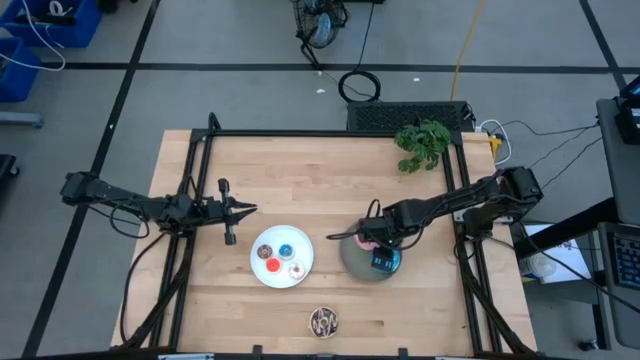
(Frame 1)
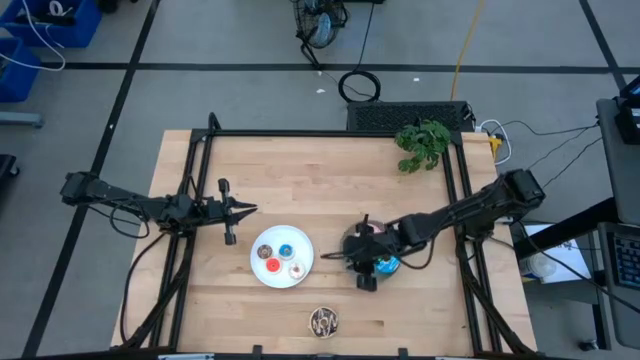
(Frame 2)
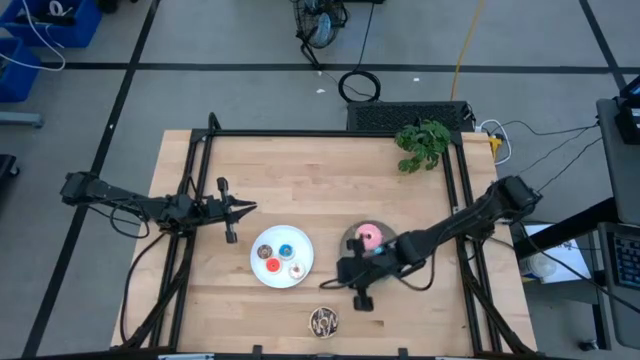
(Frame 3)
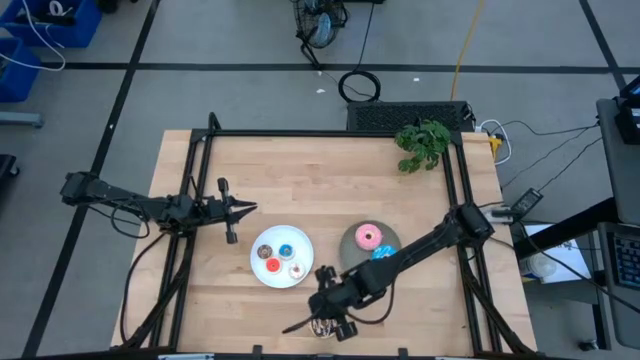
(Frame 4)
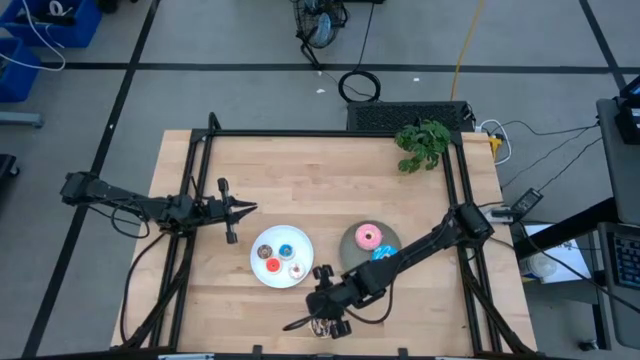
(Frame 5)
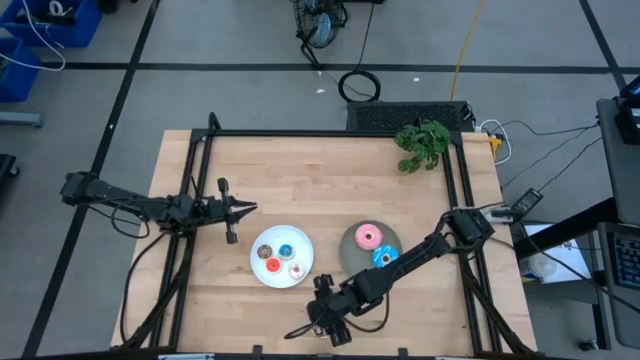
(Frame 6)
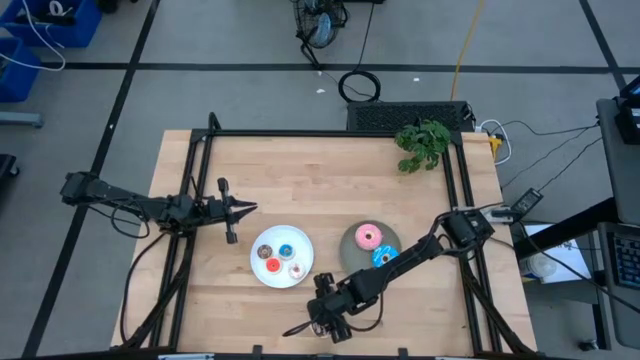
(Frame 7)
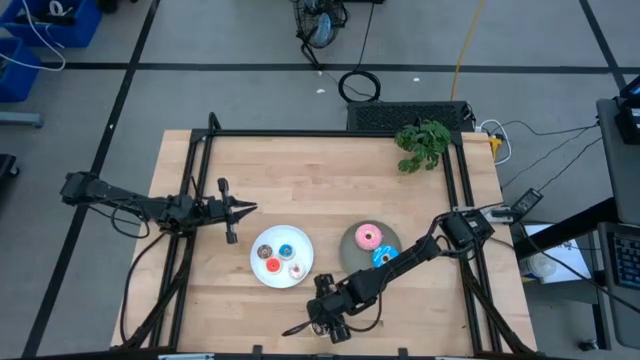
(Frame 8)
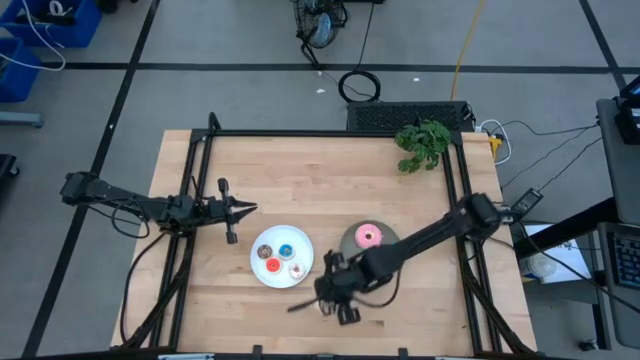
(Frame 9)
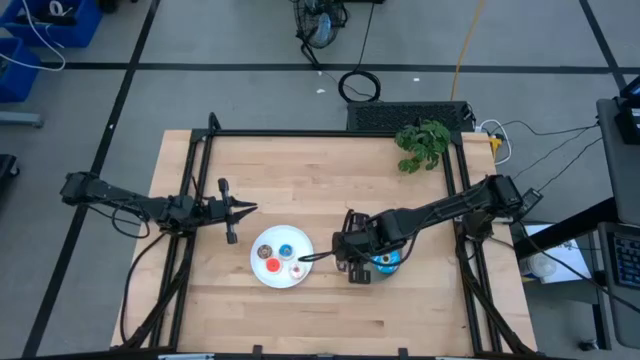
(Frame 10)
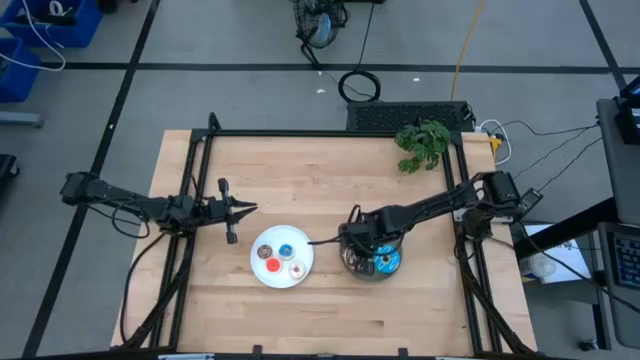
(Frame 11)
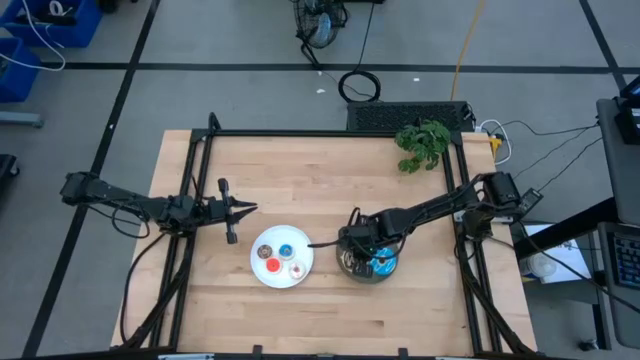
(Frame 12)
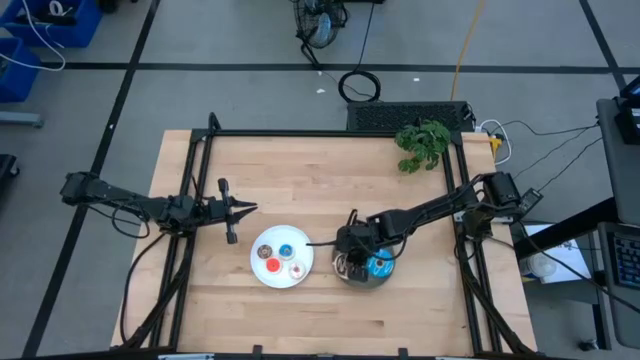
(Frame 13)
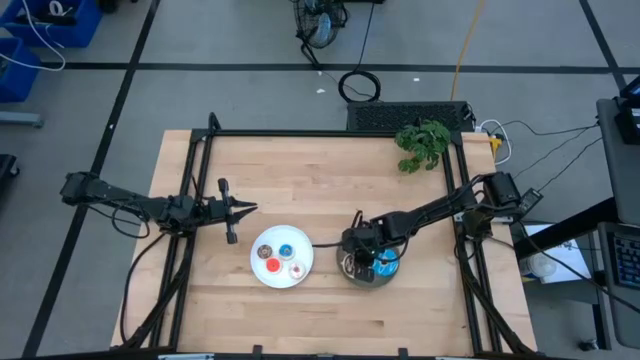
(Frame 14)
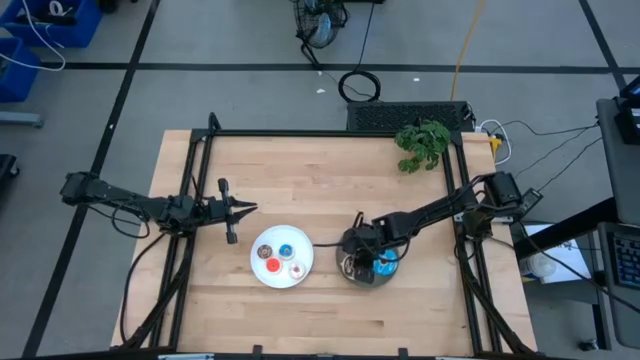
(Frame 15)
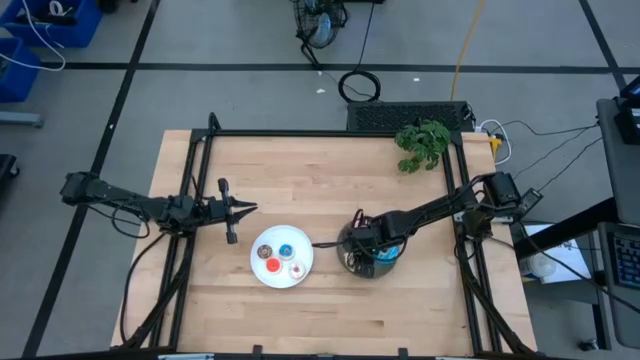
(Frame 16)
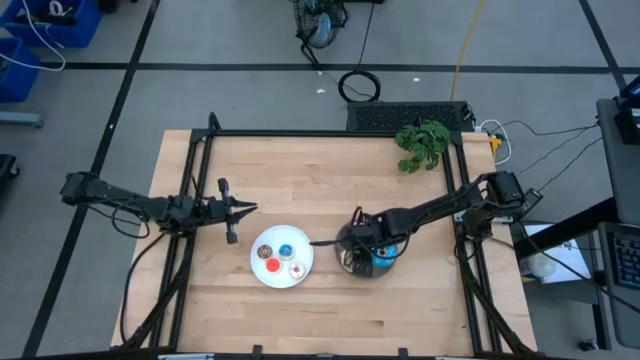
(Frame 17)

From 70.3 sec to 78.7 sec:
Task: Pick & Place donuts
Put the large black donut on the gray plate

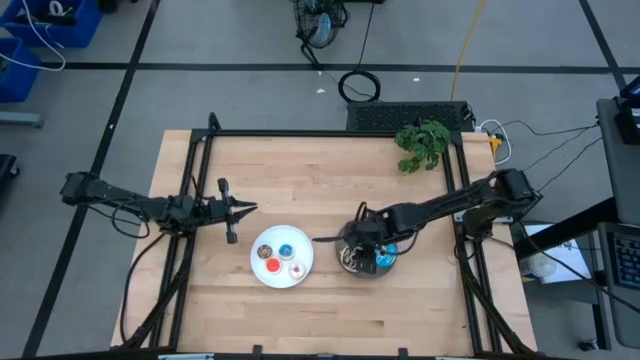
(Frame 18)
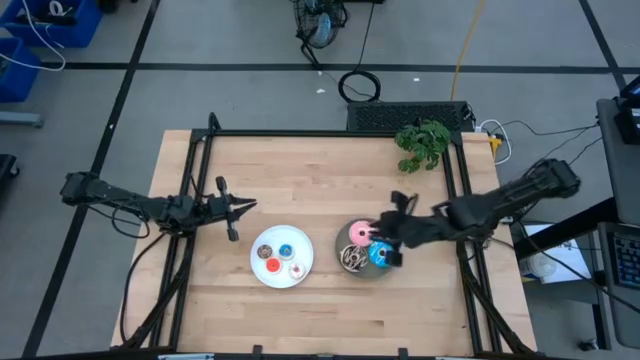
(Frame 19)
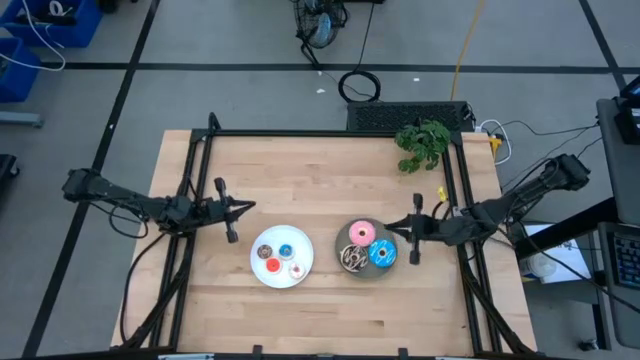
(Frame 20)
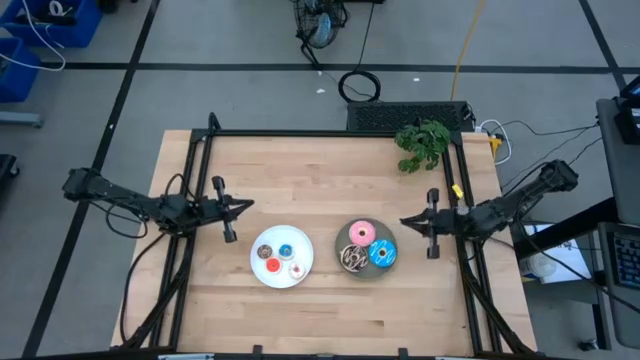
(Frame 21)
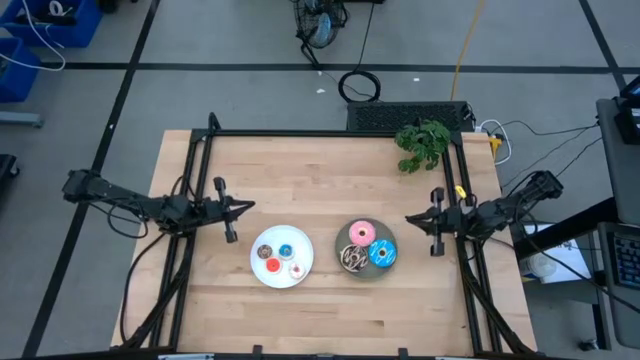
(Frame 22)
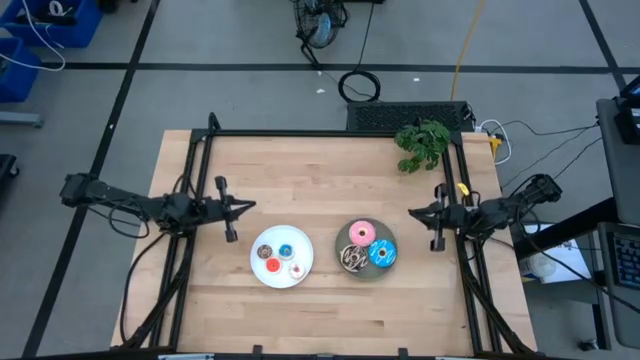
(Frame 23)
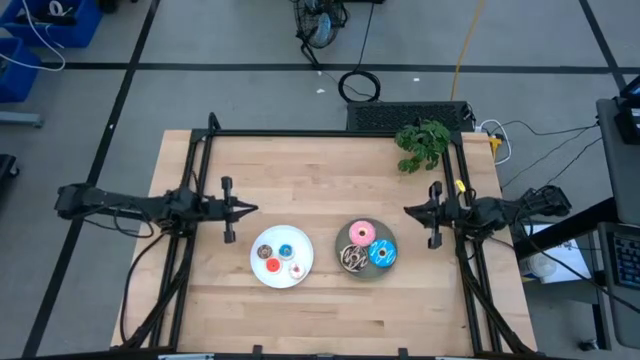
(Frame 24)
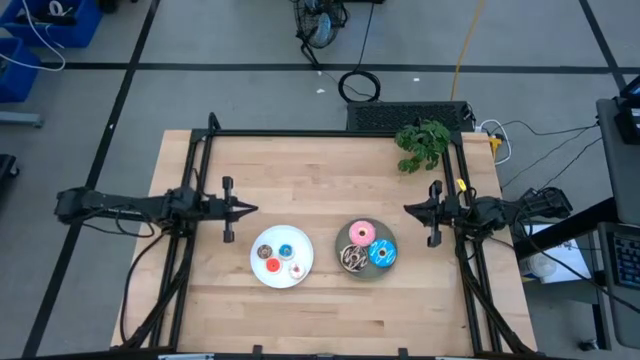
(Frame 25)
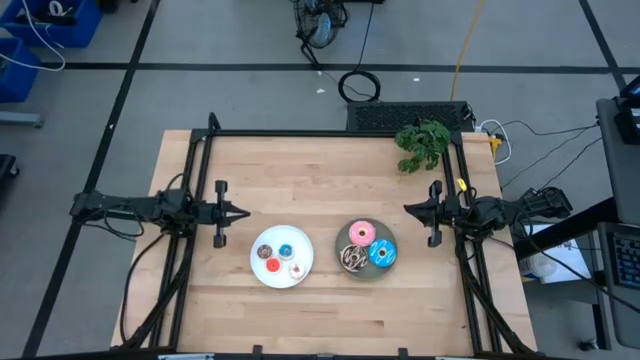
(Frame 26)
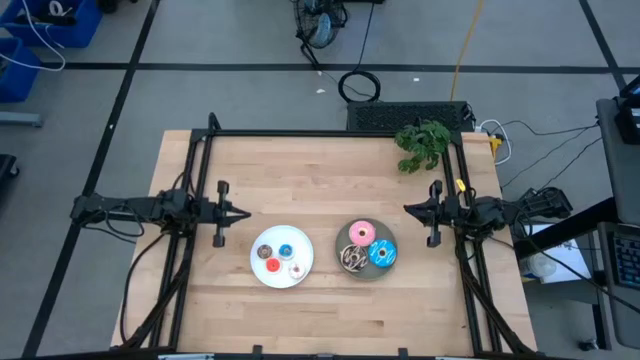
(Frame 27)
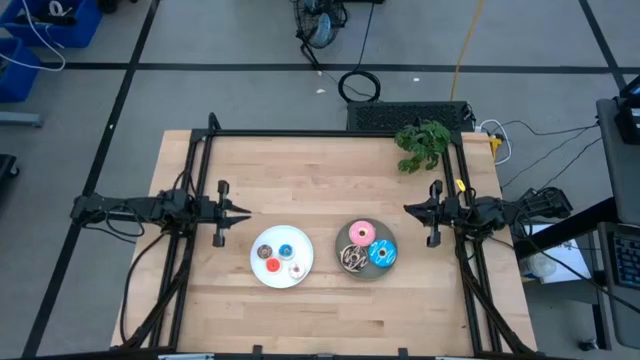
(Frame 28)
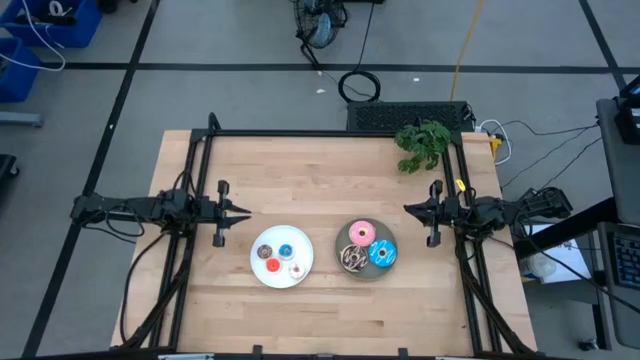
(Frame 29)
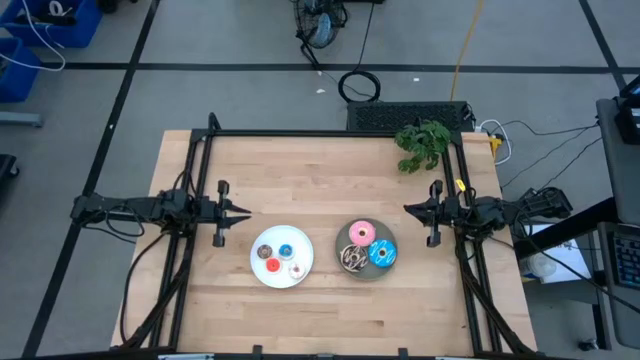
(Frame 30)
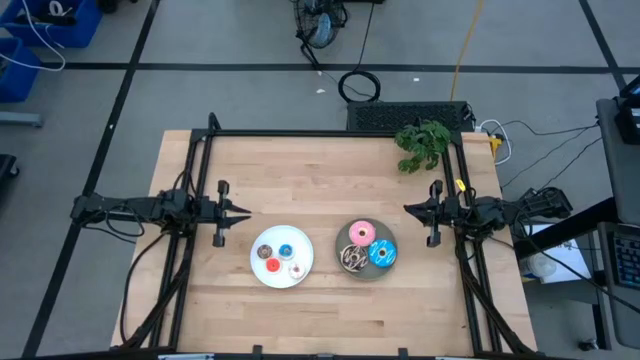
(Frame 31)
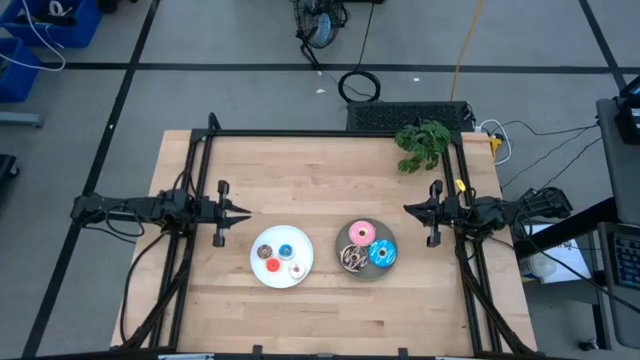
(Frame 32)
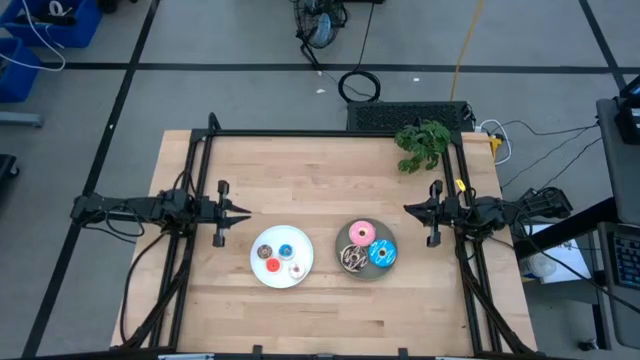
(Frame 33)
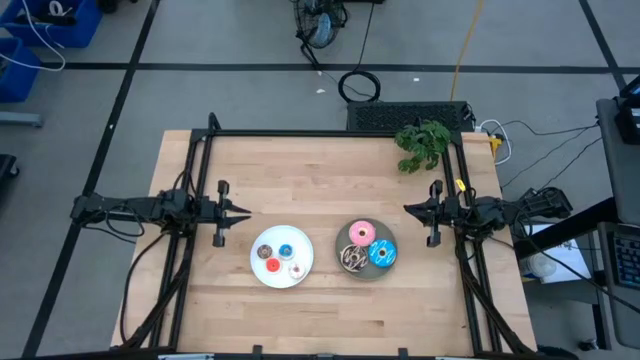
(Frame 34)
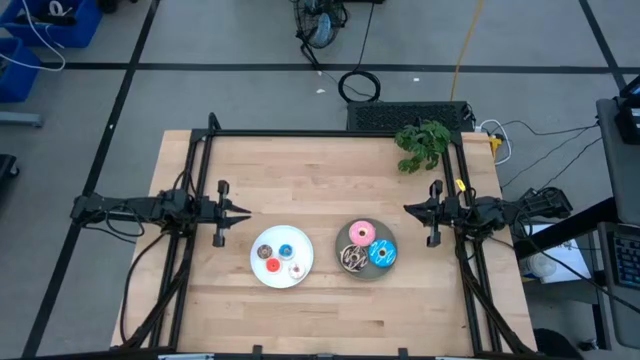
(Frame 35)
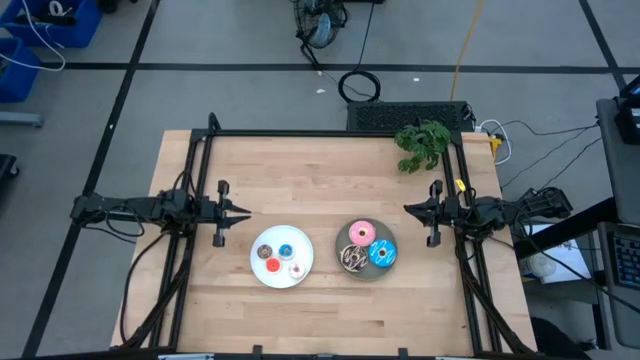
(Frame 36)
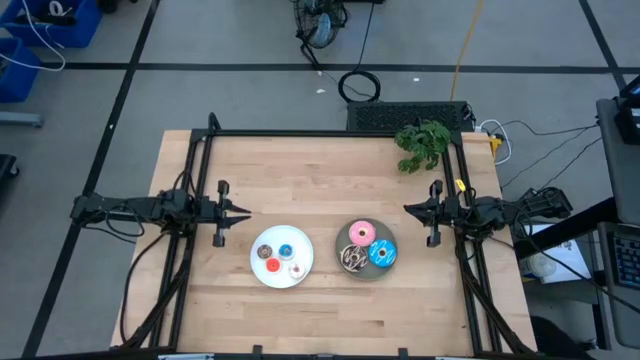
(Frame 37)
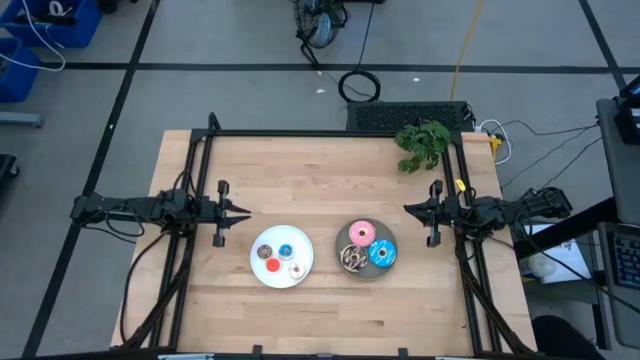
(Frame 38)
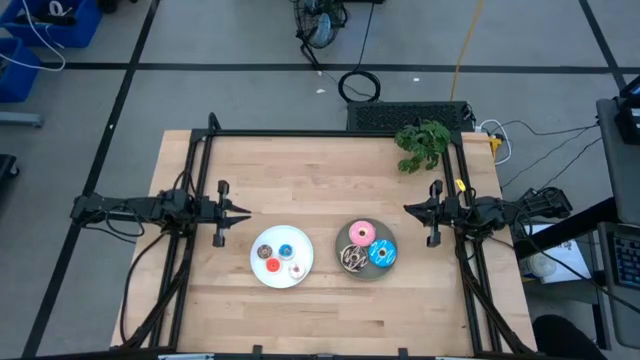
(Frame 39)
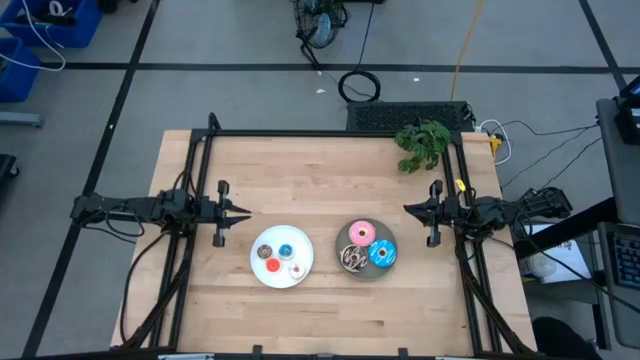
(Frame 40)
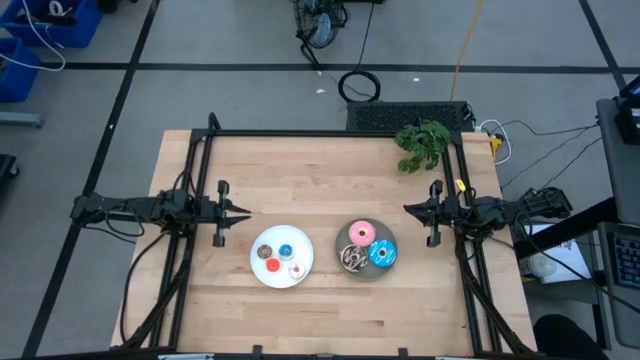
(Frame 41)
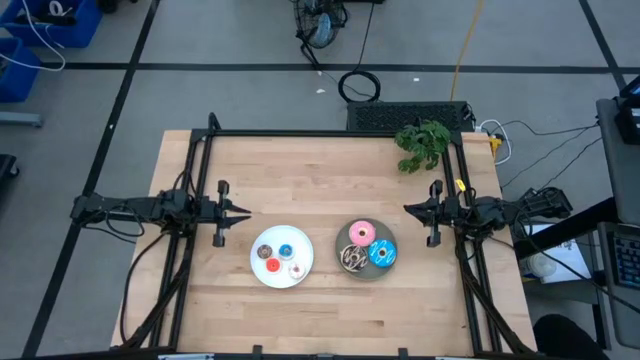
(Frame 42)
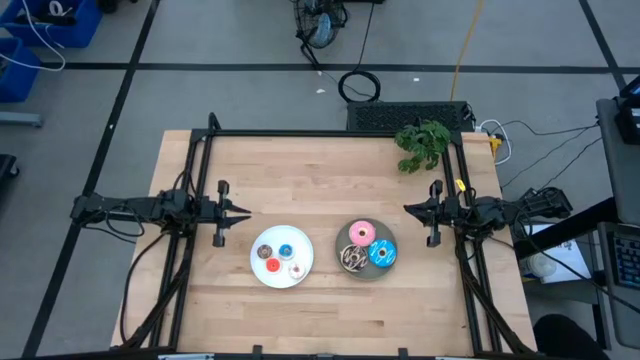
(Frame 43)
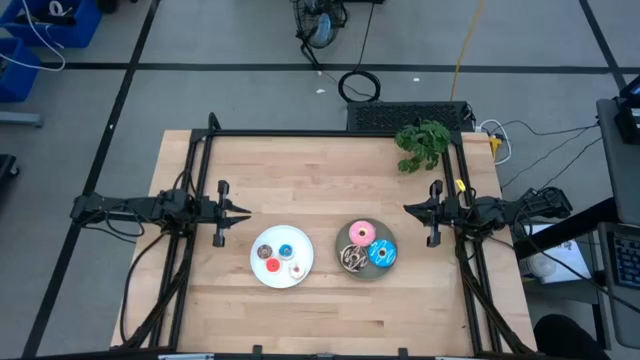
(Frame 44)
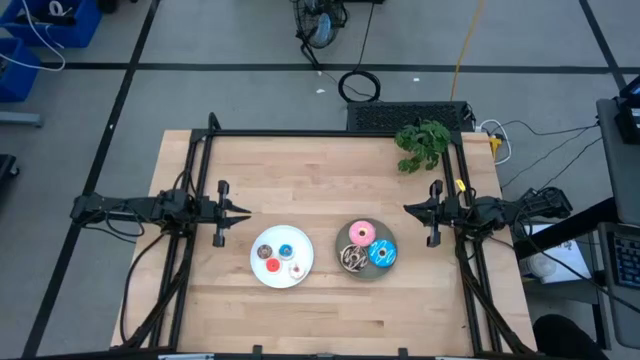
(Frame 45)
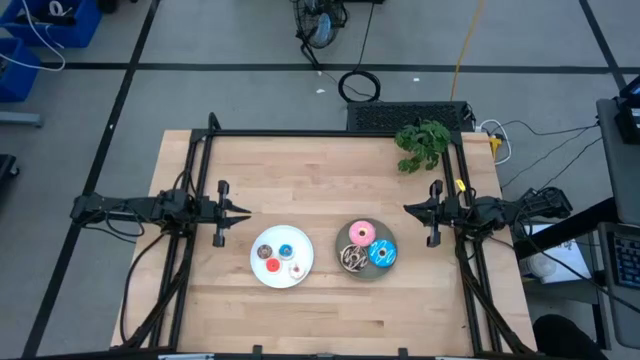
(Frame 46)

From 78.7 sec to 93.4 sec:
Return to Home Position
